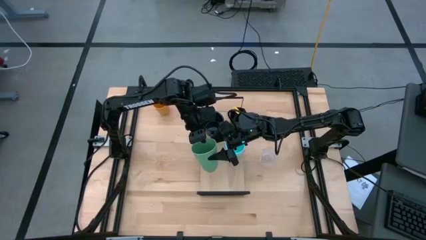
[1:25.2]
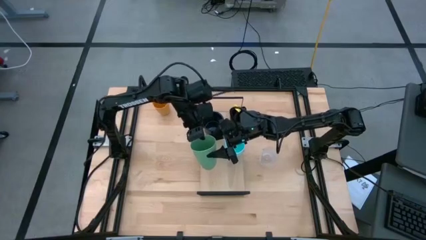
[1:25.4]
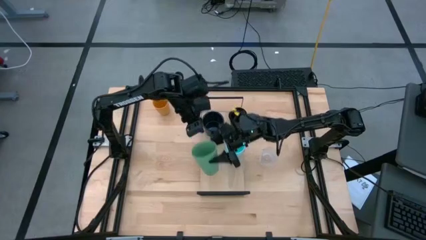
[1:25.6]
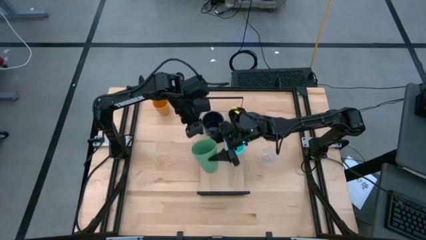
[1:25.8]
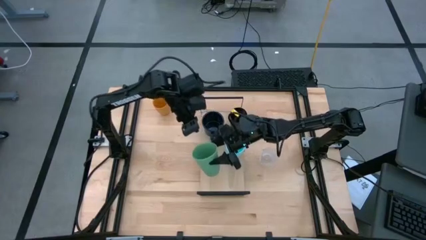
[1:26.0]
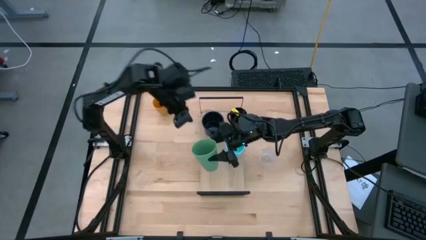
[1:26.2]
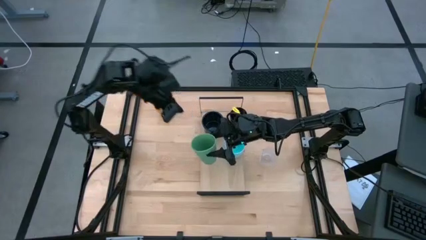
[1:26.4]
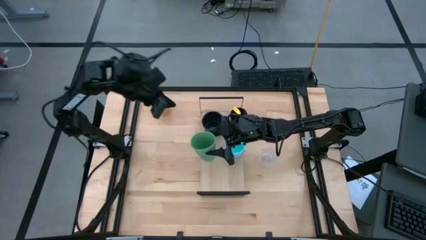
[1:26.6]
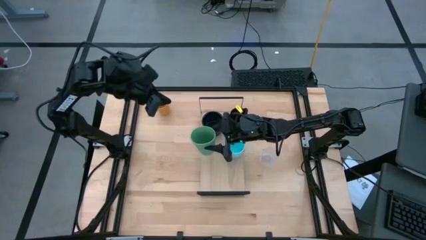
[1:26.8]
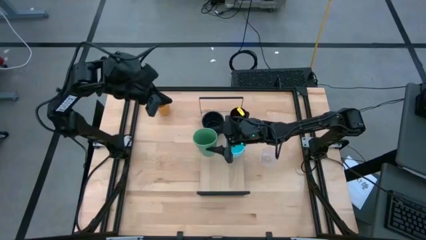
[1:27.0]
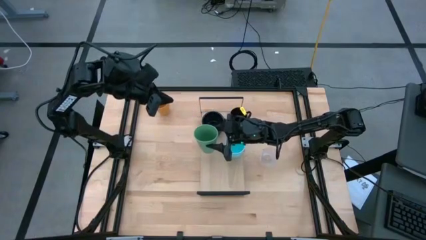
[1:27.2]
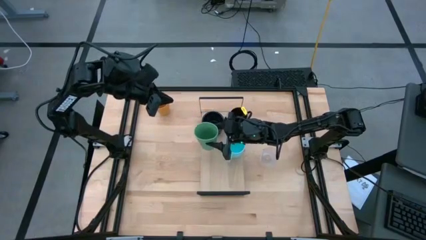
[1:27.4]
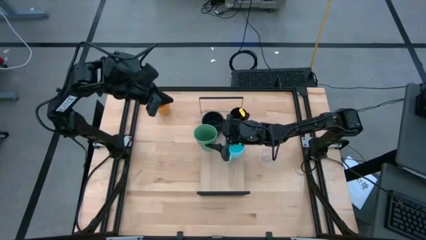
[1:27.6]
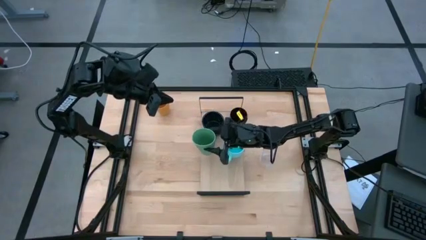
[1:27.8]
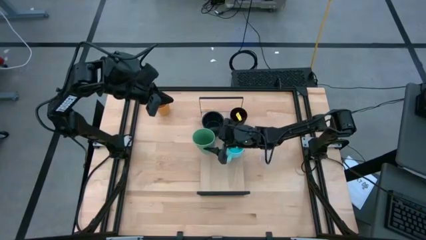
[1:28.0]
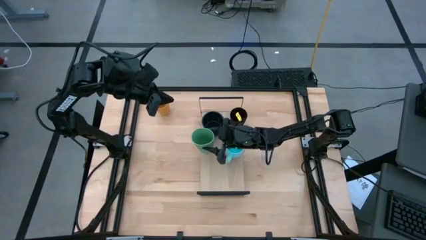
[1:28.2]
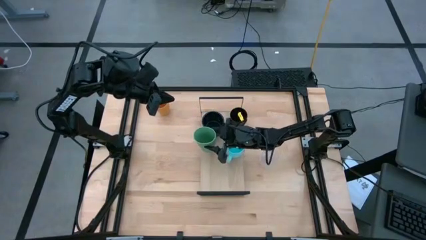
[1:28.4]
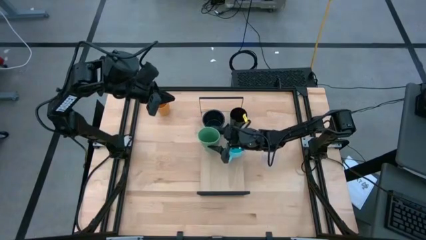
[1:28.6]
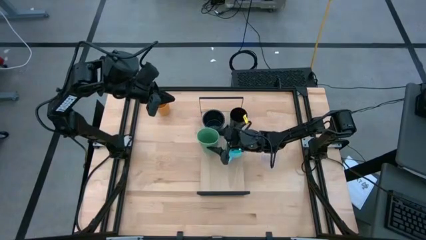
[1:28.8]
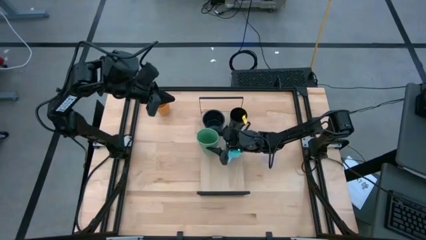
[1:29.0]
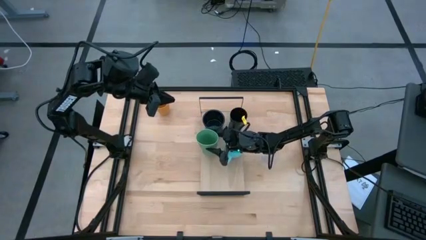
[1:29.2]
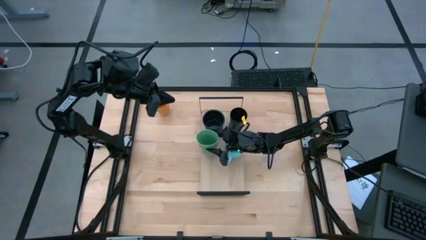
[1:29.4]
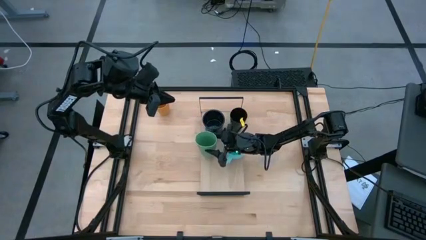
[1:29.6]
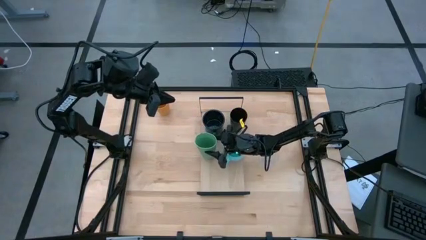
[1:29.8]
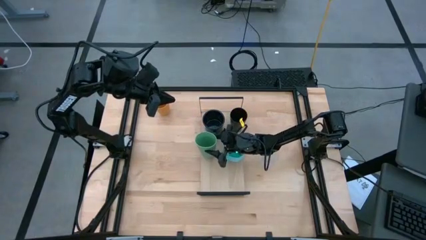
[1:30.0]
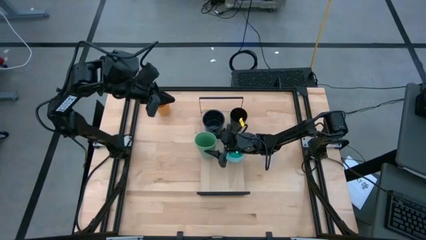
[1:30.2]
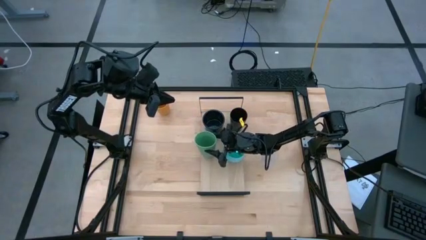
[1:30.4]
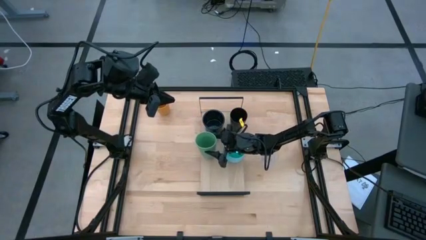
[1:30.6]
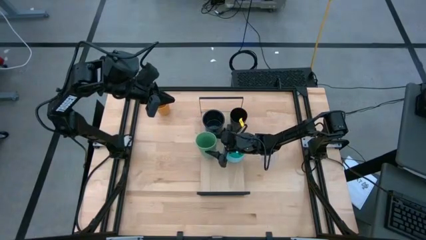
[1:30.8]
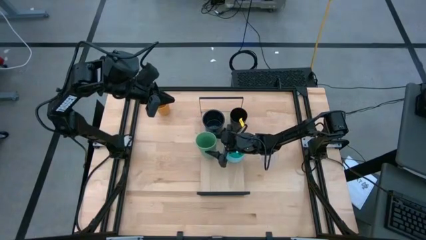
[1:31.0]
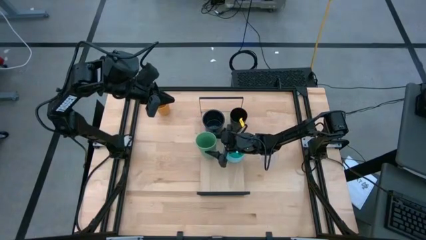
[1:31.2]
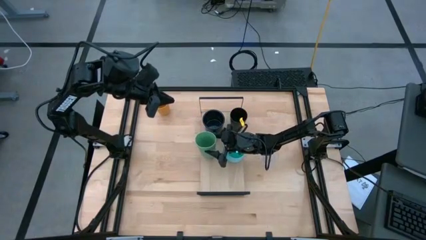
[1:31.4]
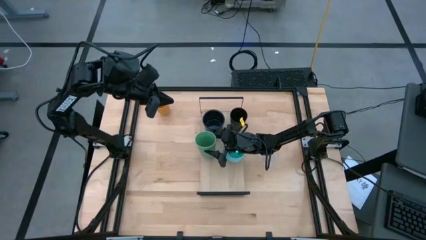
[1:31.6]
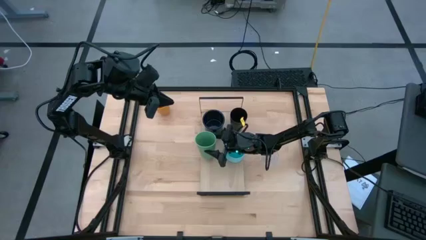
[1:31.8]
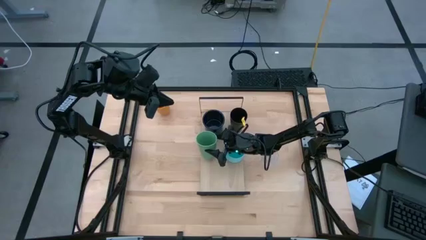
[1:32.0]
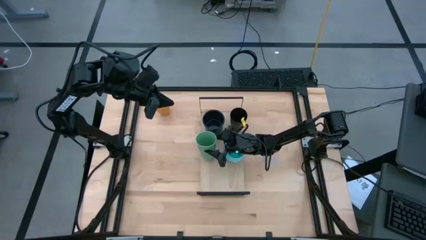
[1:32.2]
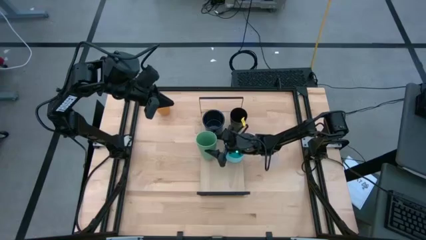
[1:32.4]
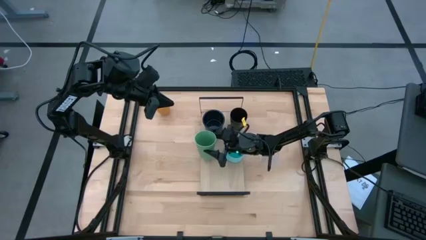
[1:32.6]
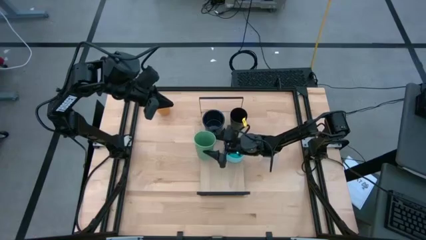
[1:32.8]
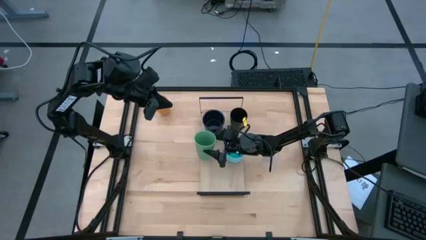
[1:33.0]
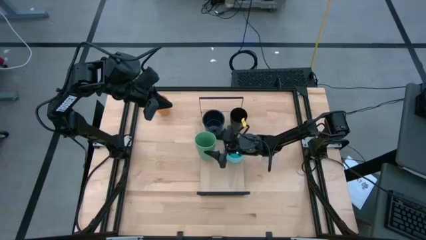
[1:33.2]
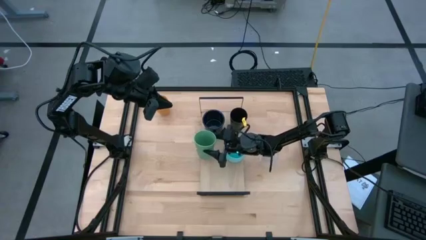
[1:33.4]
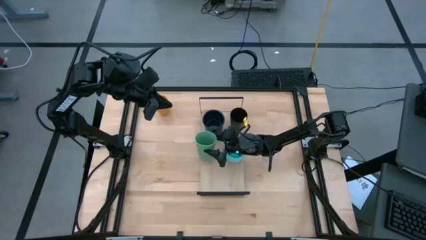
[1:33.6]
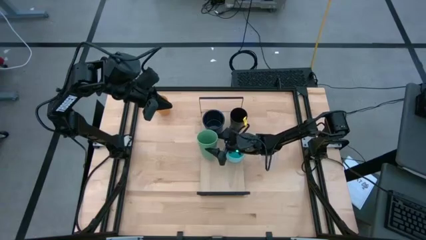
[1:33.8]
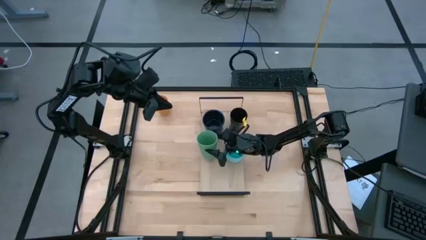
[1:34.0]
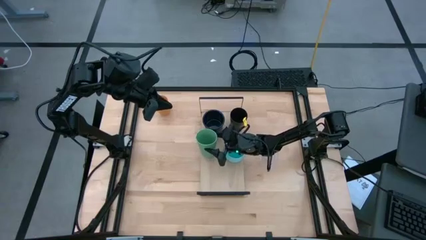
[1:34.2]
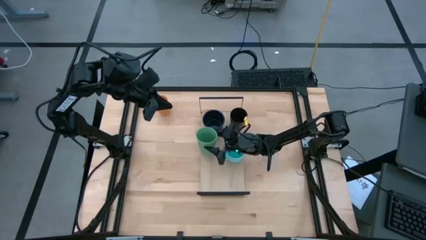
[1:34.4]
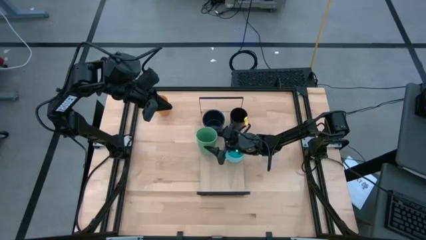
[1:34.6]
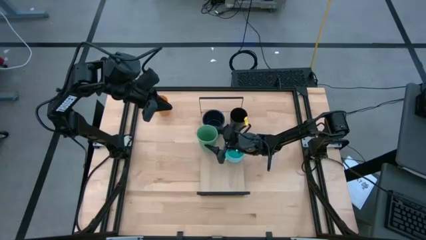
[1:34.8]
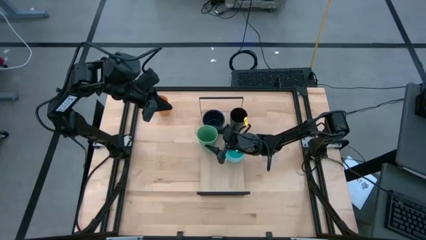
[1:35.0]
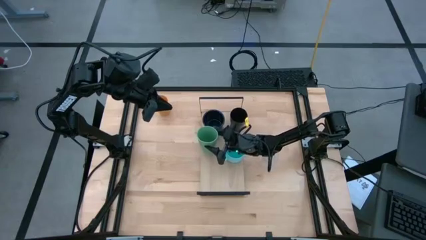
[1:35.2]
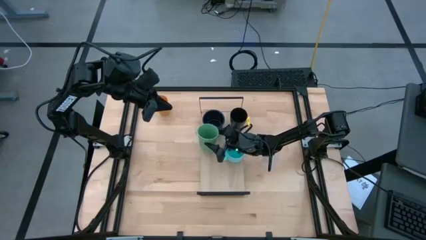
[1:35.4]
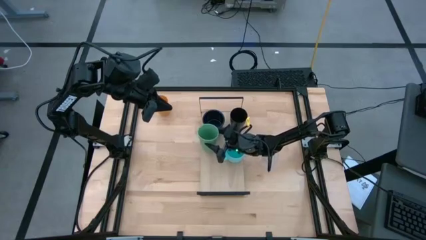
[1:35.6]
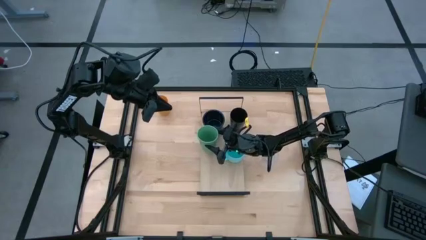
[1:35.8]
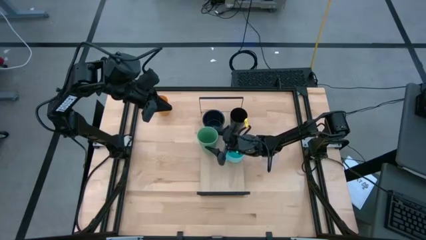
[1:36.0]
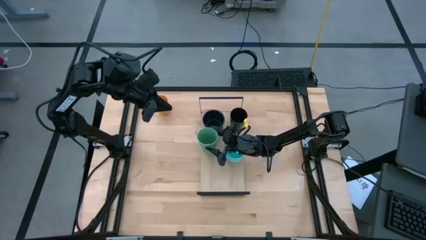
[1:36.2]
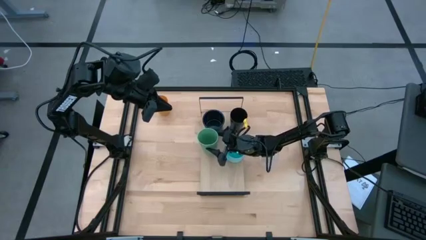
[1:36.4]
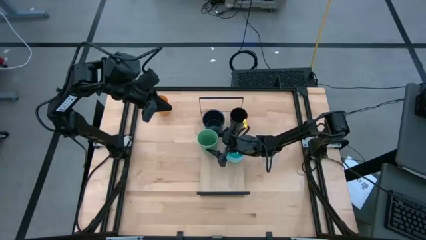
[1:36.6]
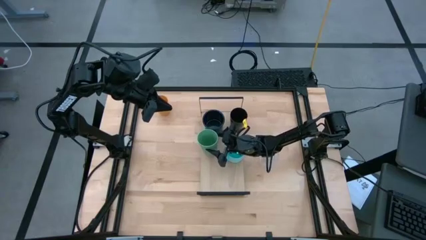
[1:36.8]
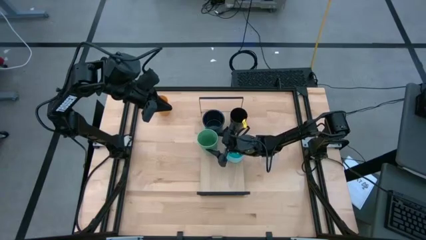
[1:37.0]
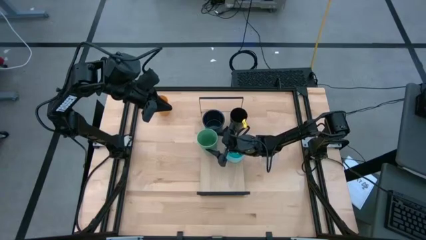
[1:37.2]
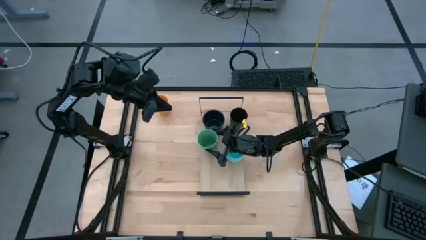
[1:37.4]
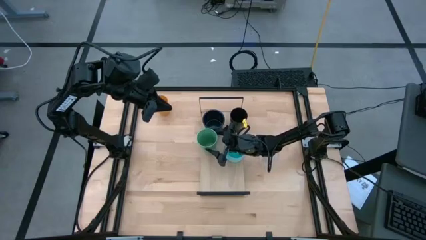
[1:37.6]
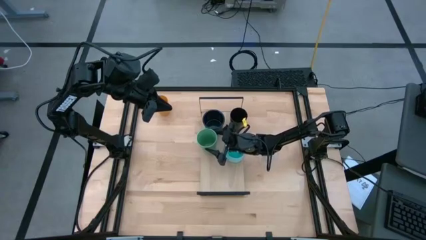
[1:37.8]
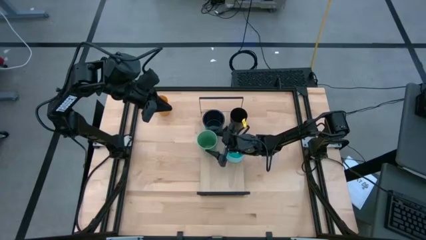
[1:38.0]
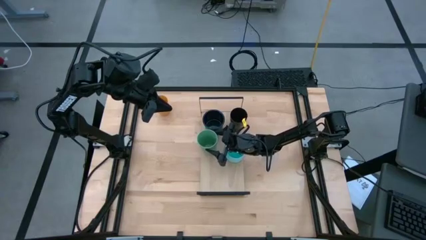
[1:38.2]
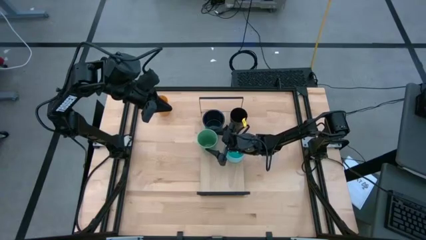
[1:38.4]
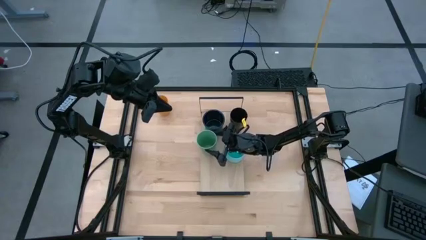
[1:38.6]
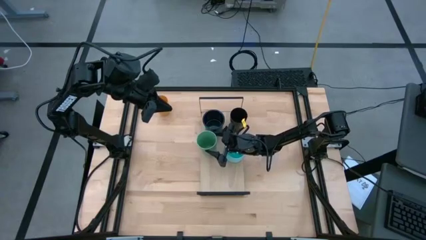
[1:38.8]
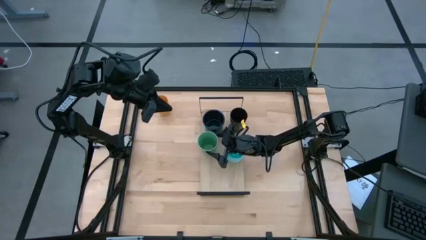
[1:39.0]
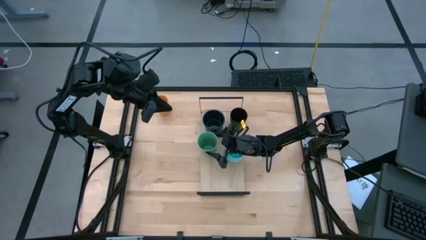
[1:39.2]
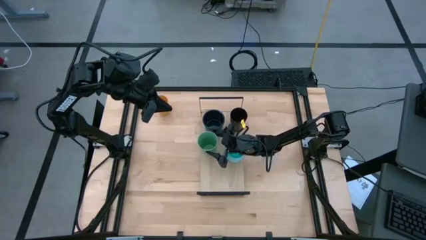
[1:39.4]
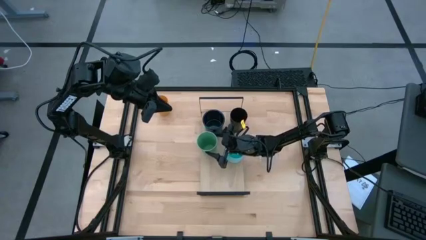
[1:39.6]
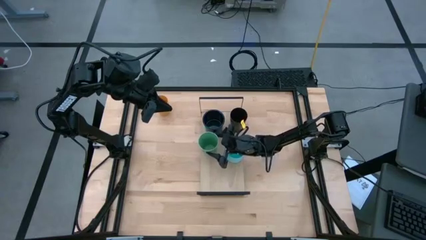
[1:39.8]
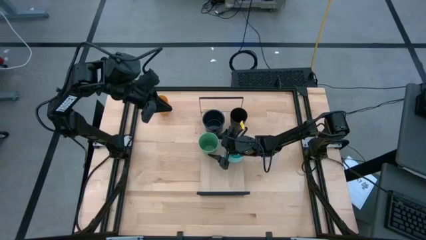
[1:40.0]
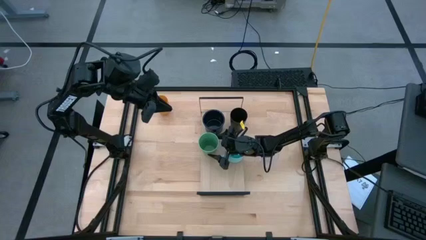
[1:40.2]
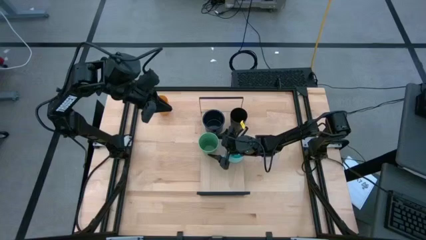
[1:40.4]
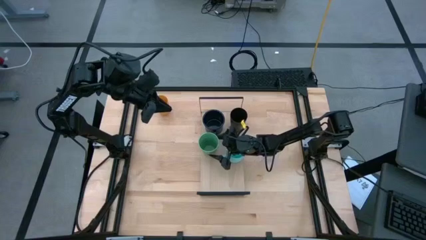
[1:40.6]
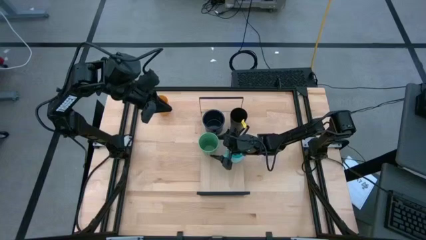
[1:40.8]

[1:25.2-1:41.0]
Task: Stack small to large cups/mugs on shelf
Put the green cup on the shelf
